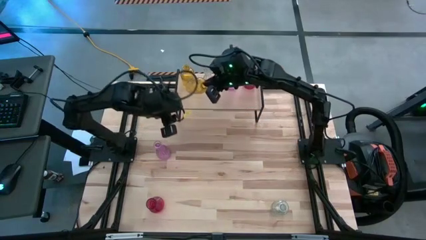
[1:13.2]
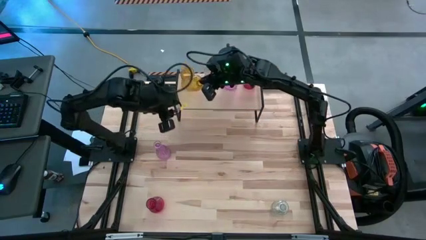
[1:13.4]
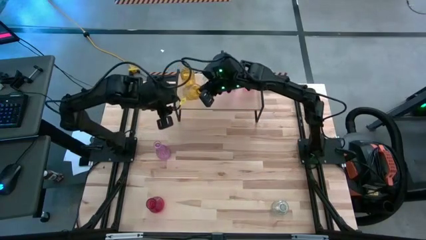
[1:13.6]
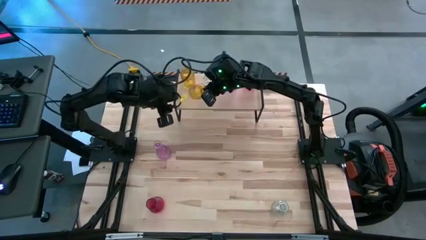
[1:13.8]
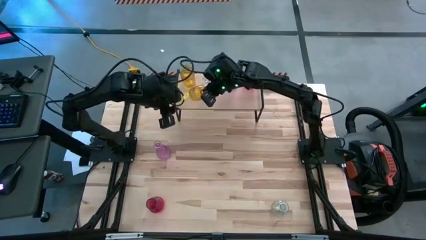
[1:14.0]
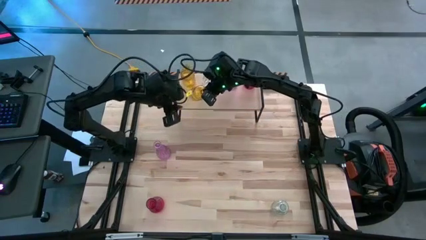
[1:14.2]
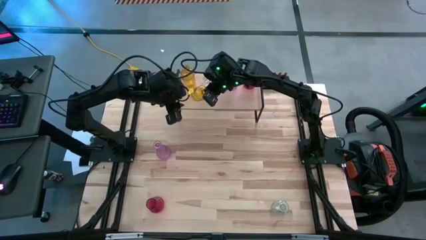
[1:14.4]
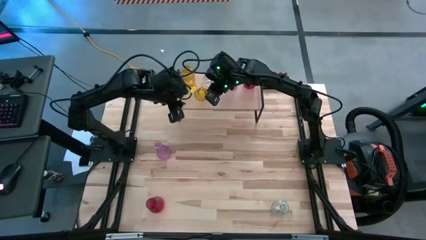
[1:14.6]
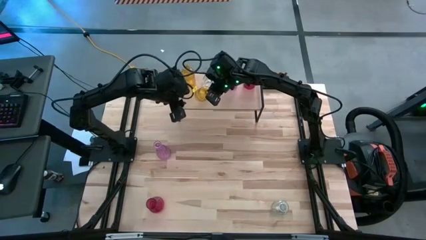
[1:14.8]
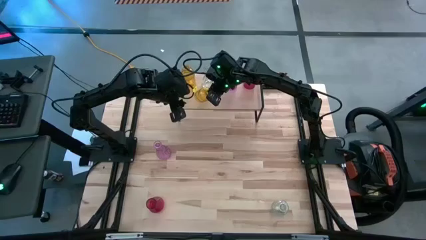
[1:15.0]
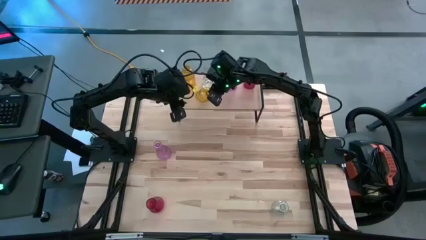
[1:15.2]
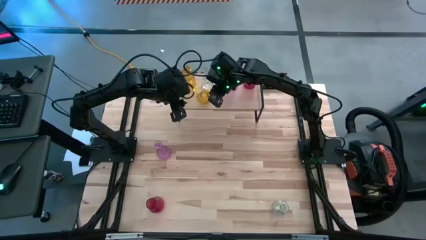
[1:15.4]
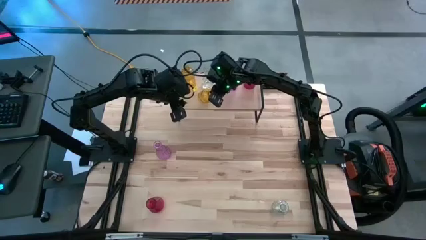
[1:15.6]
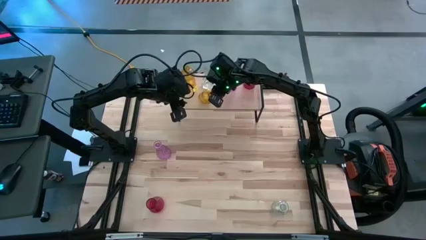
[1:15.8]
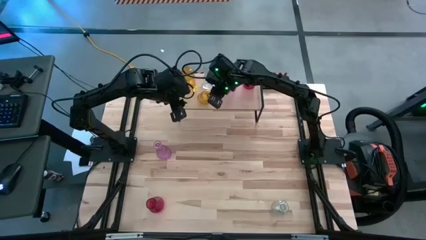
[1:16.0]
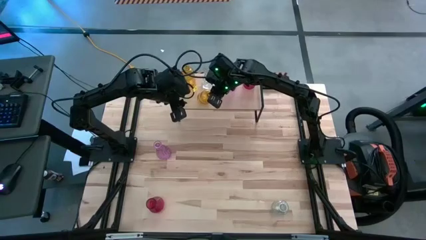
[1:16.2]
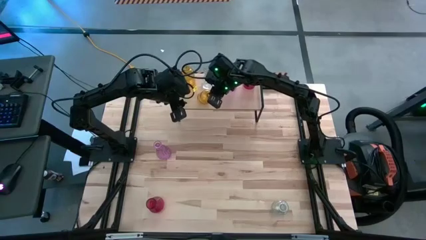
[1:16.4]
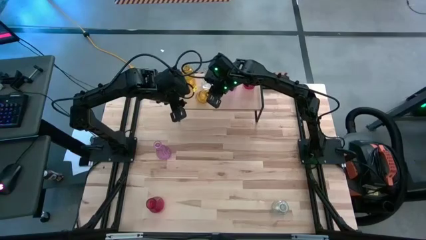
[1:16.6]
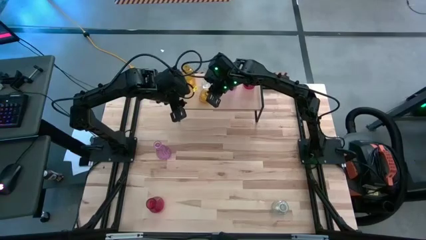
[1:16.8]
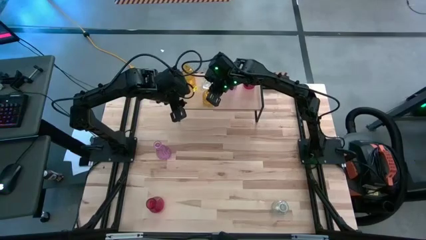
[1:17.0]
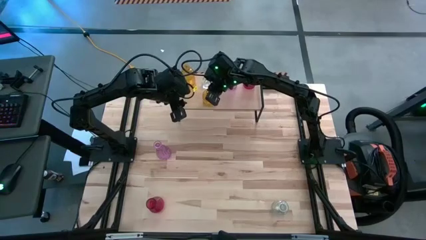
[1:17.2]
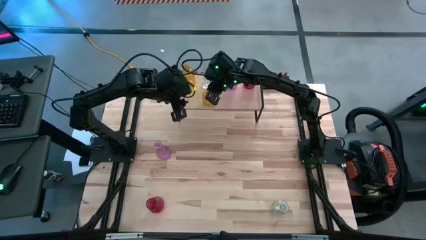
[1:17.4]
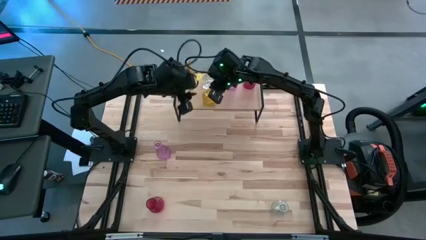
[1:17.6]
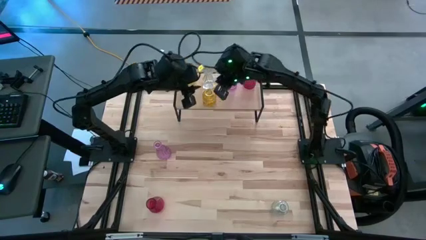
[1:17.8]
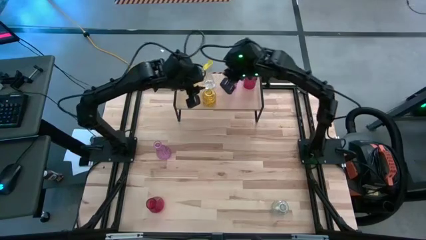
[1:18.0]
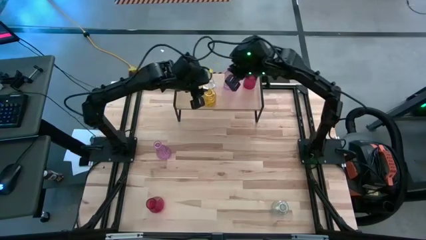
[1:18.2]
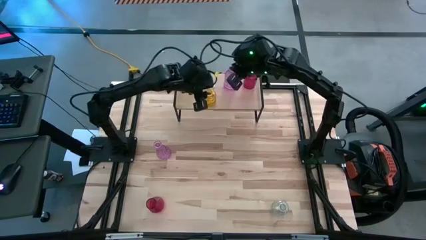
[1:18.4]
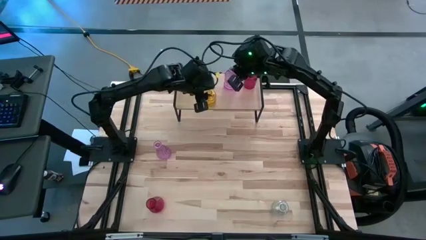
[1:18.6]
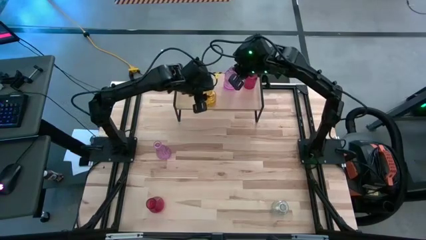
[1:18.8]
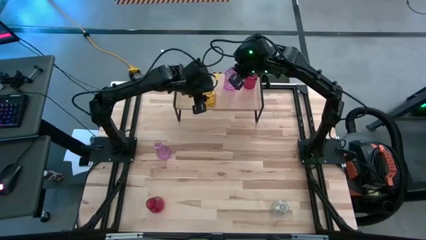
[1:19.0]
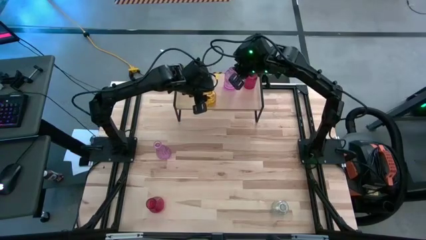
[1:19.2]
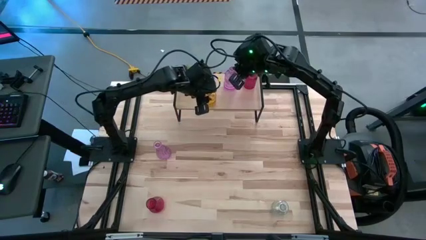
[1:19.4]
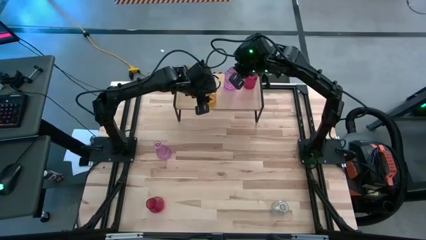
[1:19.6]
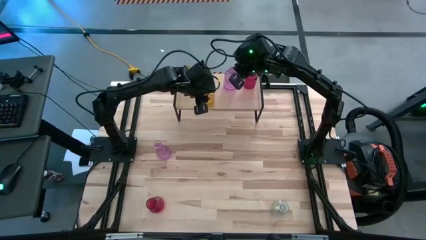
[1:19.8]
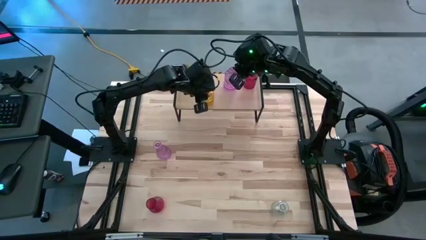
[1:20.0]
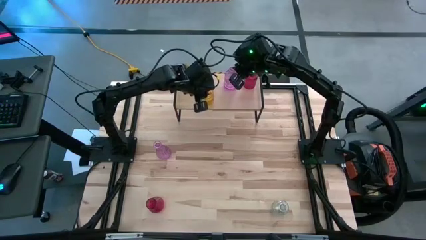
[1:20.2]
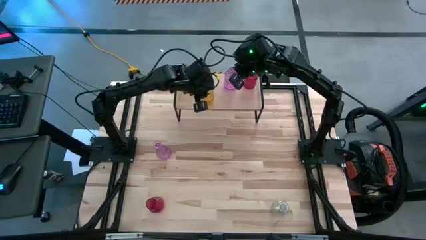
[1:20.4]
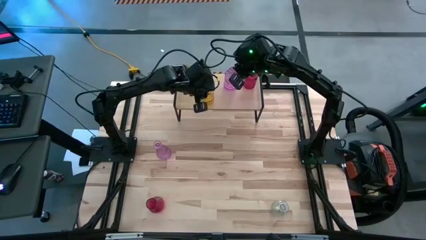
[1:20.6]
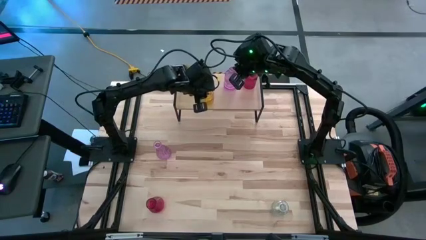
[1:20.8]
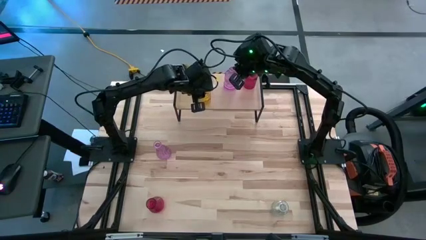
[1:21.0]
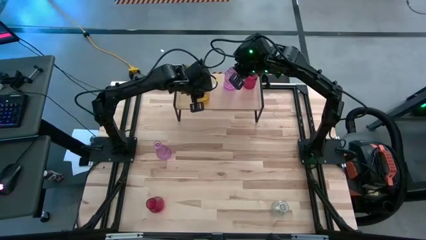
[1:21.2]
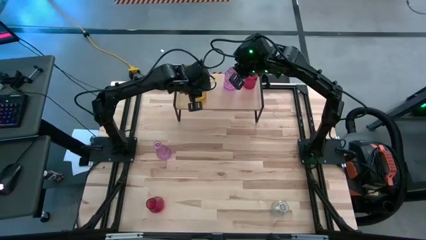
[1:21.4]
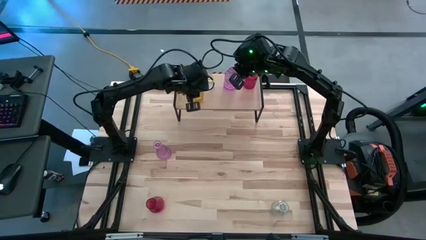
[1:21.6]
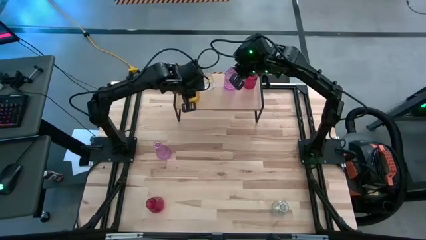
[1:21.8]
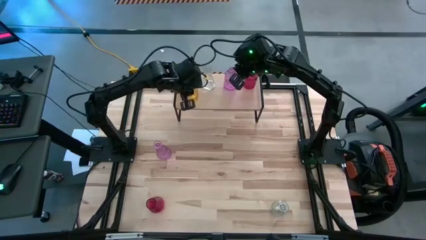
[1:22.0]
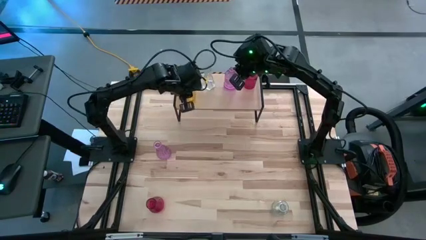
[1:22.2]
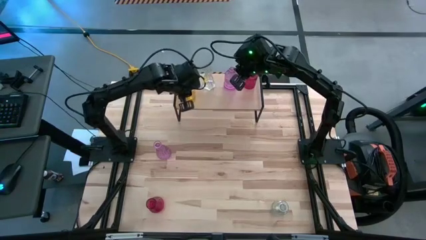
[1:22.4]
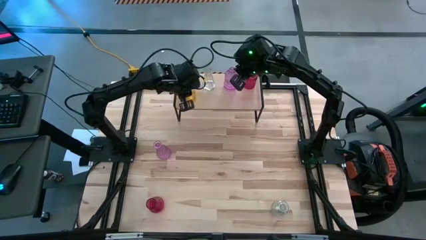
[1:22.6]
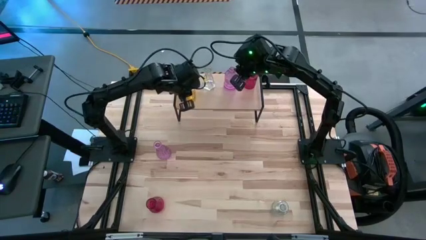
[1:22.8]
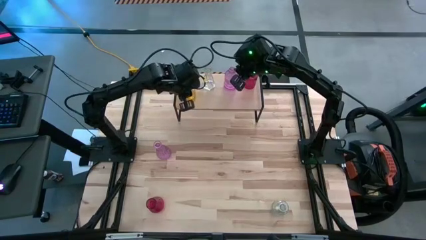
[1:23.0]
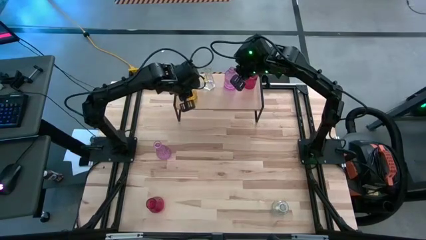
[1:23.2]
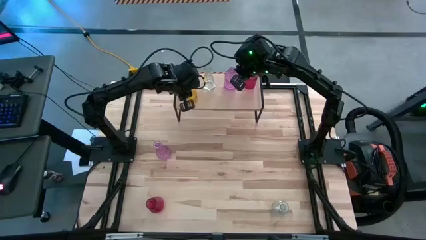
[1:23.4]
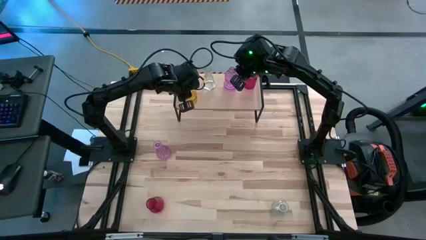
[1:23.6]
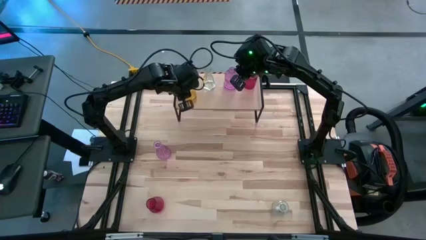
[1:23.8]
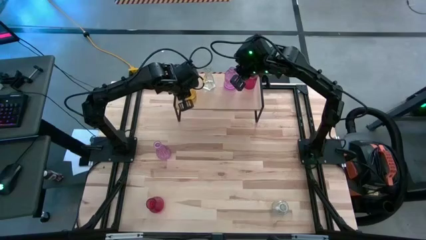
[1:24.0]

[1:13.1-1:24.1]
Task: sort vases onto shelf
Put the yellow vase on the shelf aligned with the other yellow vase

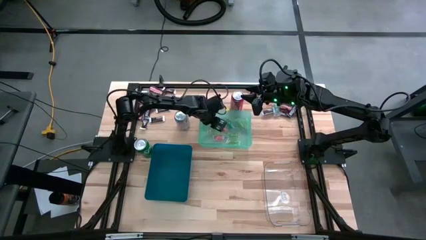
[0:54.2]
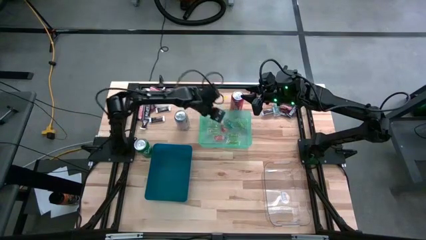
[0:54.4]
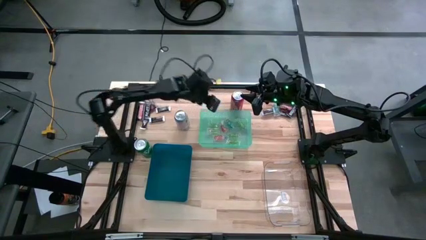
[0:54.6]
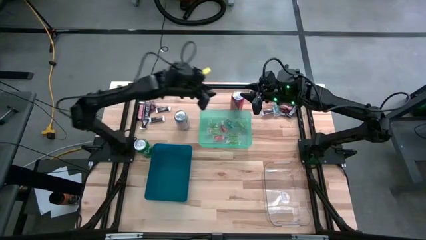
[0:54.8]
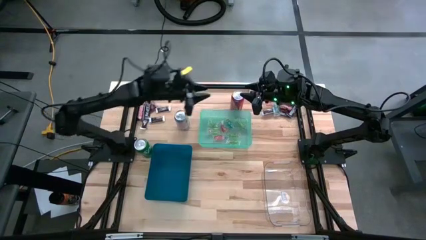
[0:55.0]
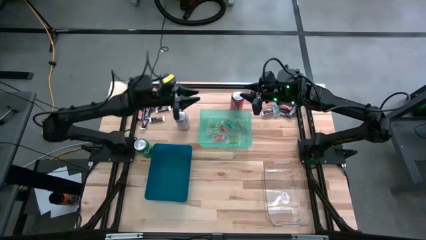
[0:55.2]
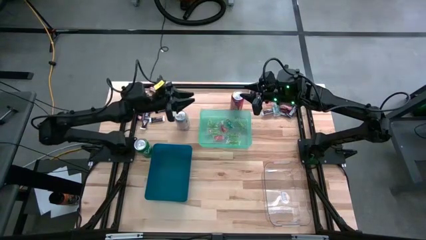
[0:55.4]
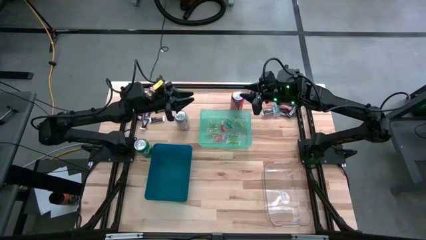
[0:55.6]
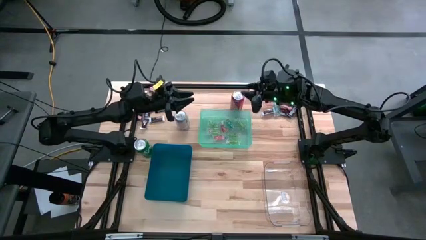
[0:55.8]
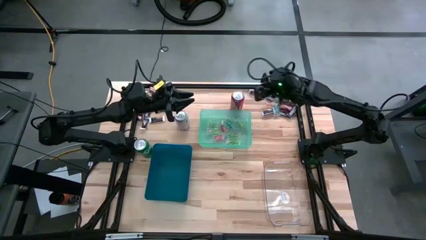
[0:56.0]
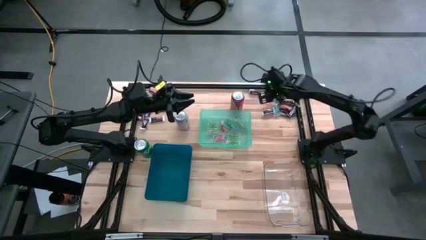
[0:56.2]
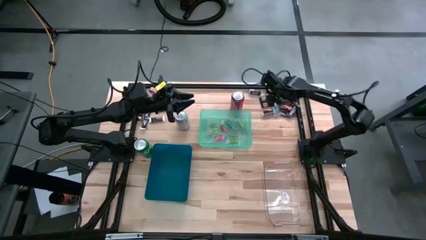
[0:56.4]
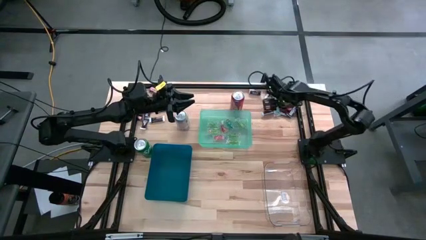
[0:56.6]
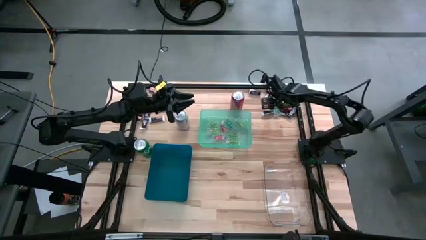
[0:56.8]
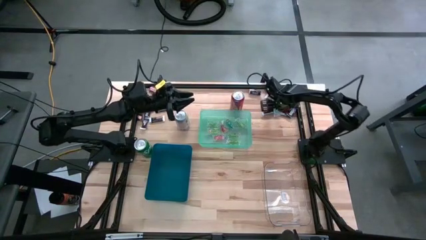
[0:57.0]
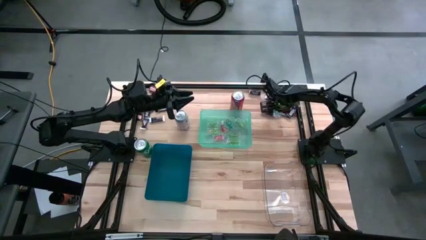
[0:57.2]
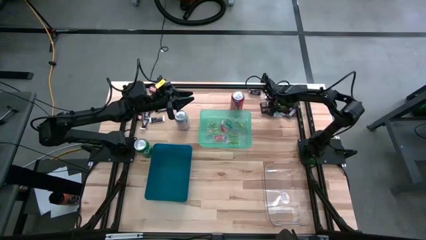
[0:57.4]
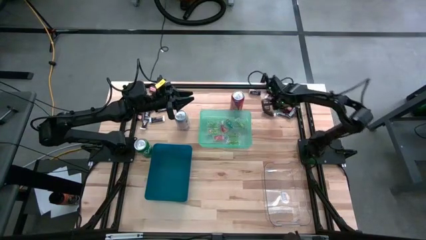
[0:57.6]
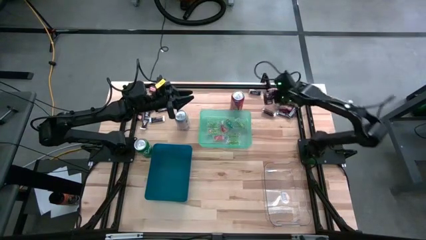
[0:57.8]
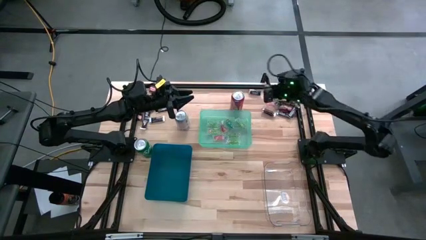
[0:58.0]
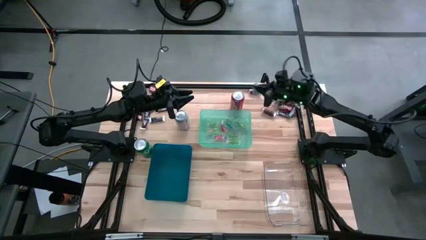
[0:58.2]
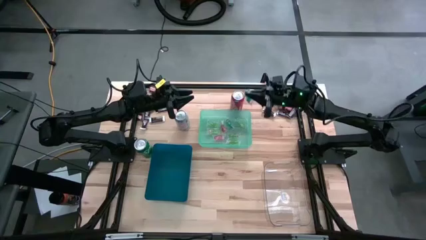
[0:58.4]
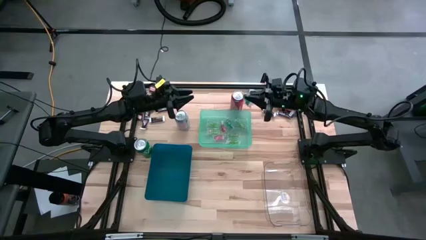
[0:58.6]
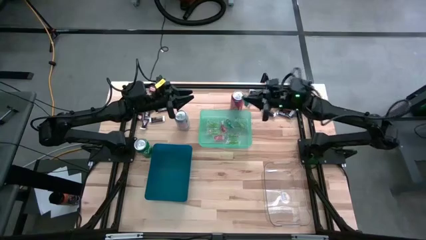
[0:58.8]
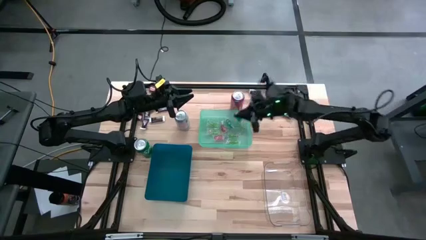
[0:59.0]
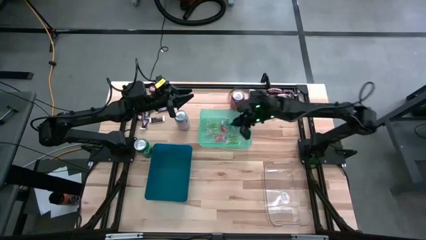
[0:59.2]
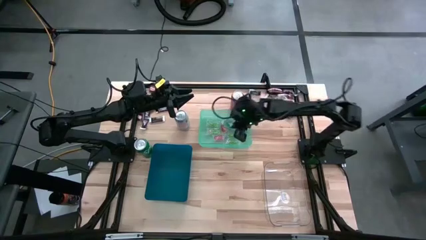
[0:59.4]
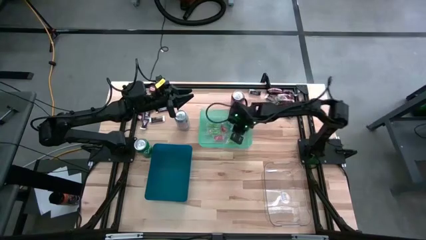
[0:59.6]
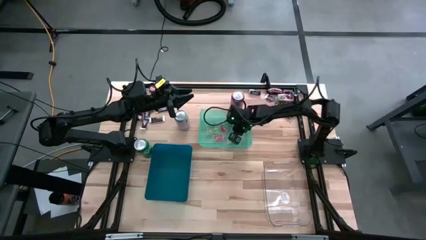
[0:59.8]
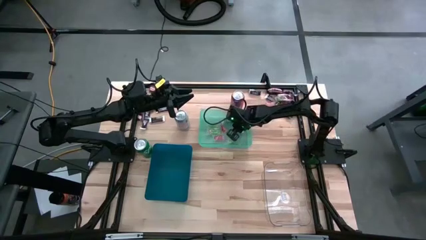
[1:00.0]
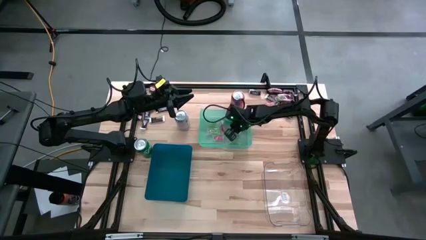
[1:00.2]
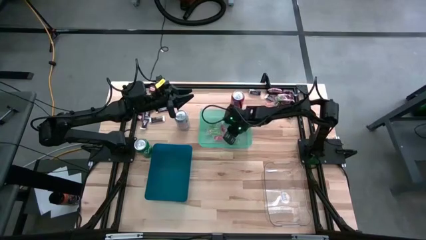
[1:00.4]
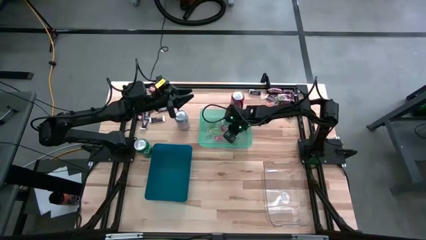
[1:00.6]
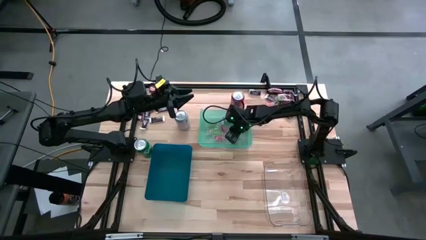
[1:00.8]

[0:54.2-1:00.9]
Task: Organize candy in baskets
Put the blue gummy into the green bin
